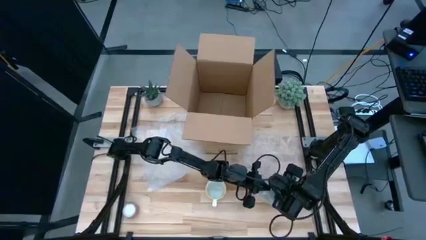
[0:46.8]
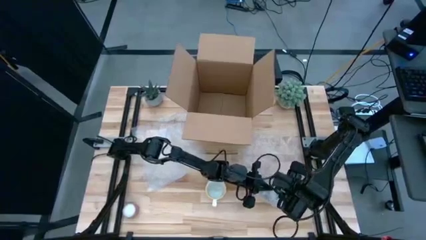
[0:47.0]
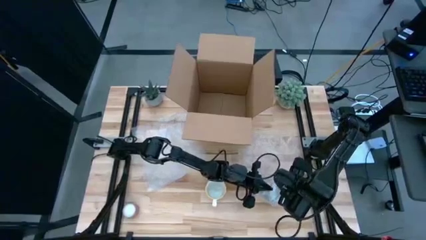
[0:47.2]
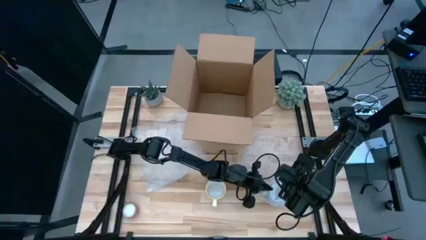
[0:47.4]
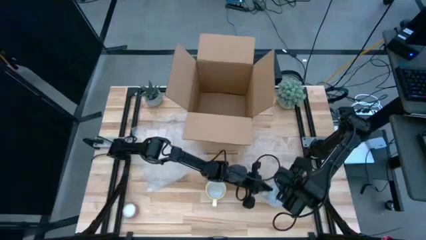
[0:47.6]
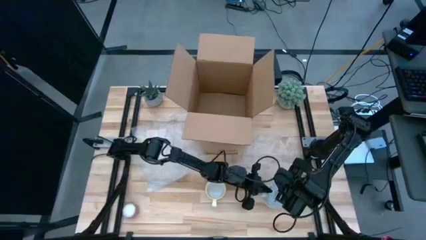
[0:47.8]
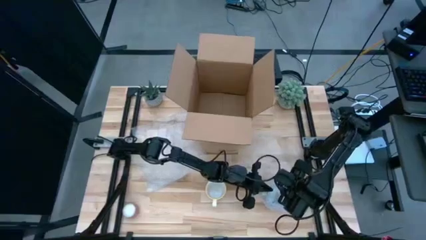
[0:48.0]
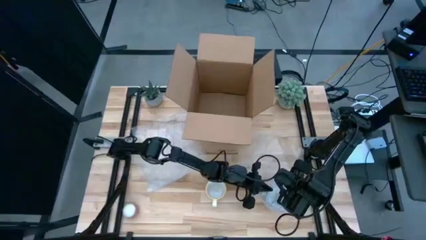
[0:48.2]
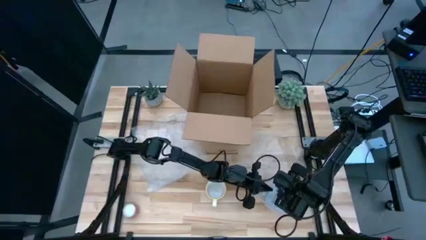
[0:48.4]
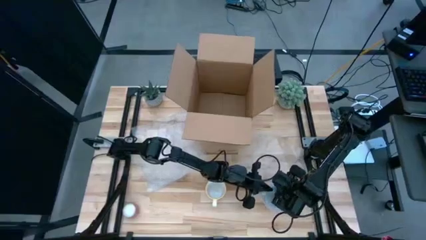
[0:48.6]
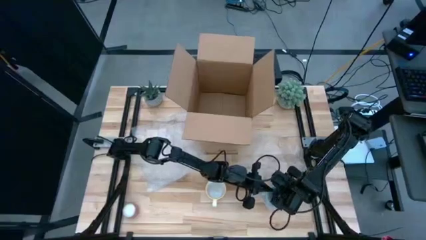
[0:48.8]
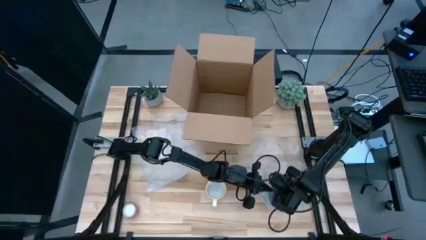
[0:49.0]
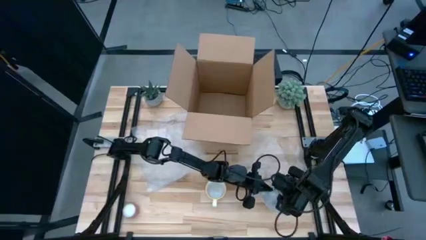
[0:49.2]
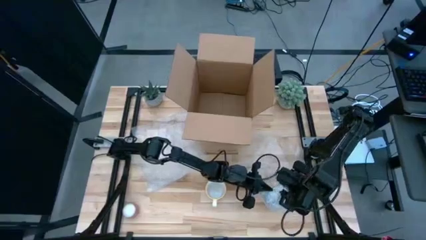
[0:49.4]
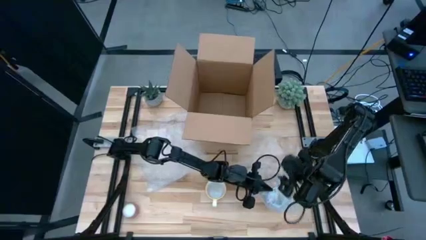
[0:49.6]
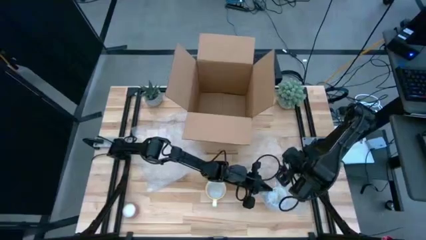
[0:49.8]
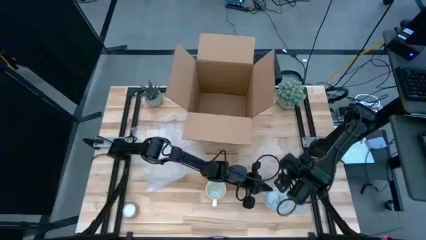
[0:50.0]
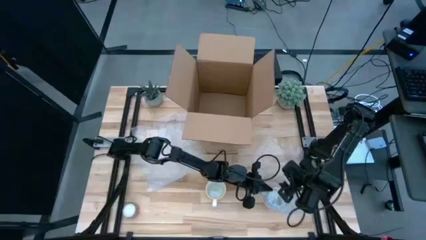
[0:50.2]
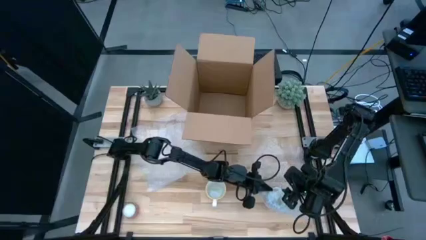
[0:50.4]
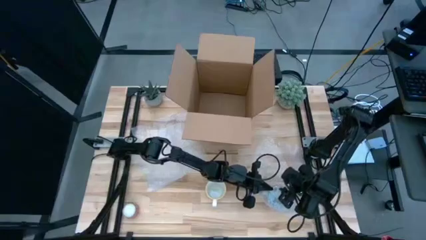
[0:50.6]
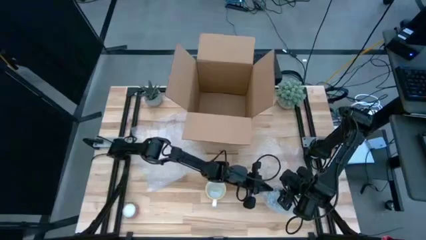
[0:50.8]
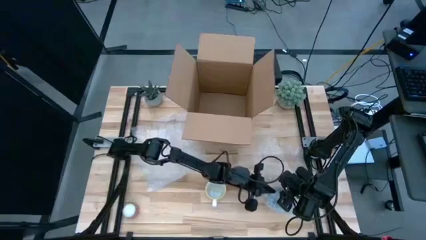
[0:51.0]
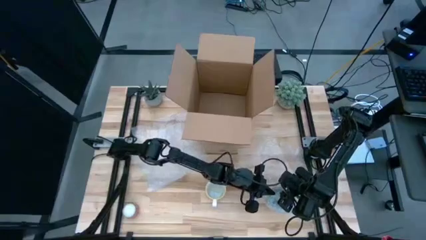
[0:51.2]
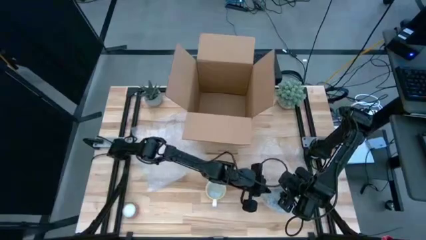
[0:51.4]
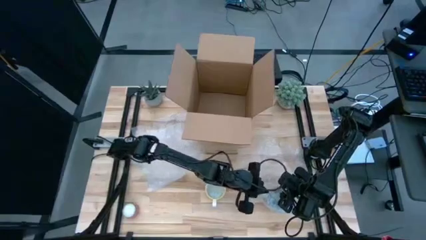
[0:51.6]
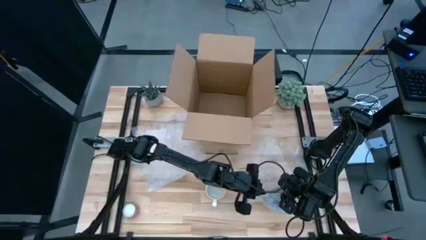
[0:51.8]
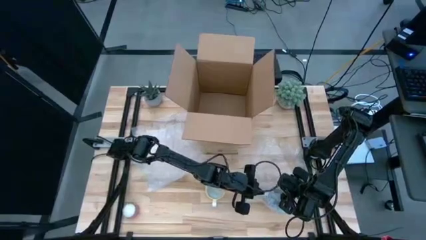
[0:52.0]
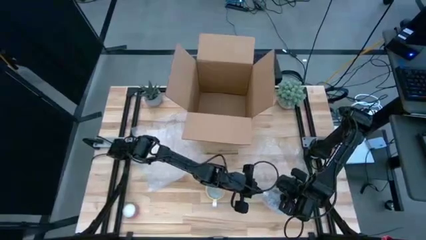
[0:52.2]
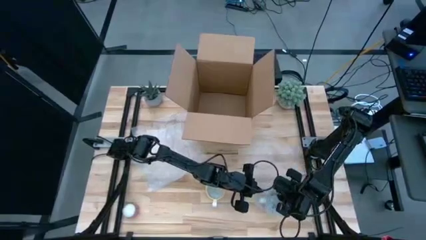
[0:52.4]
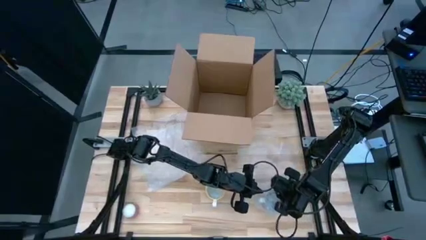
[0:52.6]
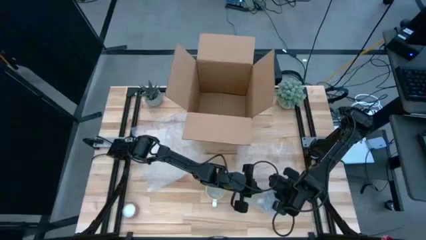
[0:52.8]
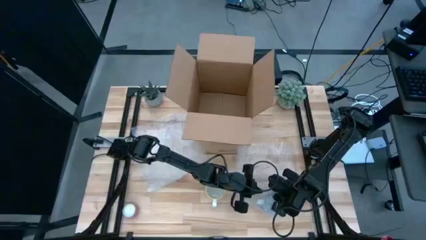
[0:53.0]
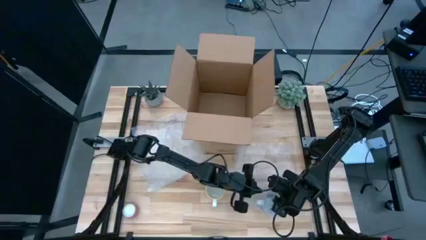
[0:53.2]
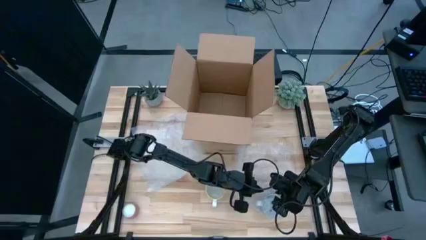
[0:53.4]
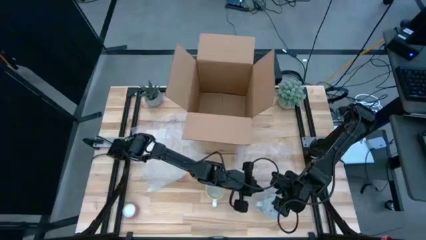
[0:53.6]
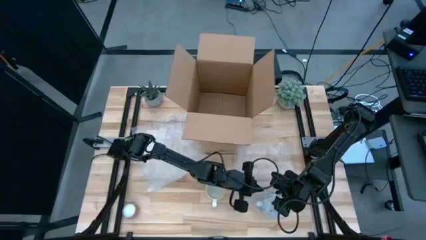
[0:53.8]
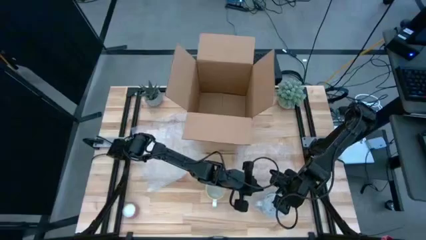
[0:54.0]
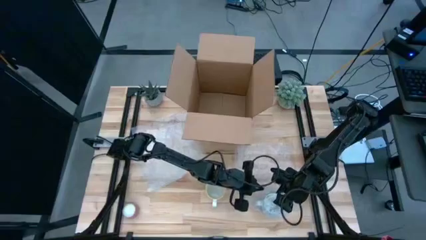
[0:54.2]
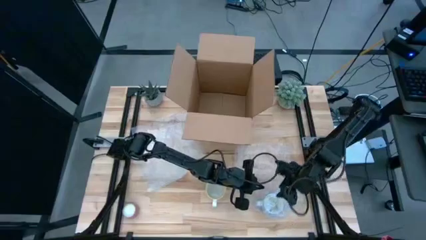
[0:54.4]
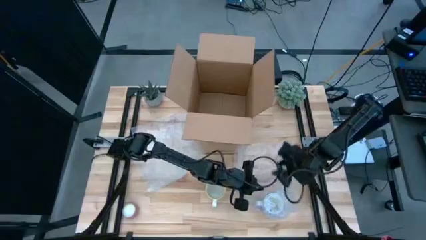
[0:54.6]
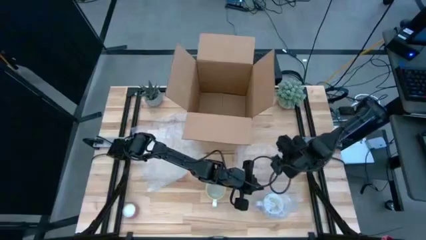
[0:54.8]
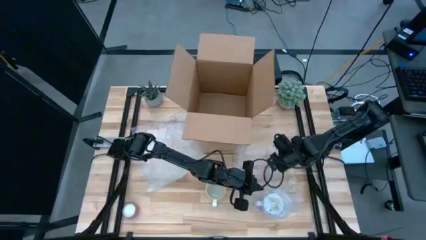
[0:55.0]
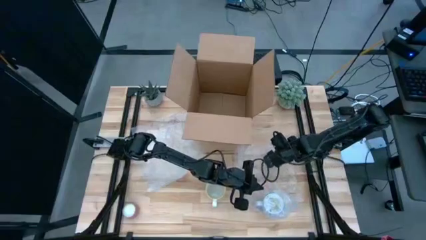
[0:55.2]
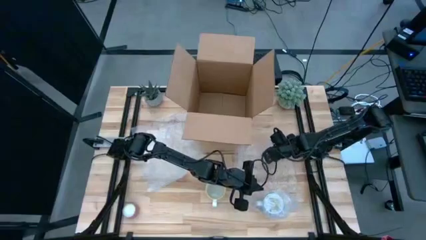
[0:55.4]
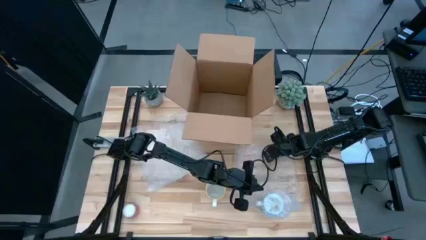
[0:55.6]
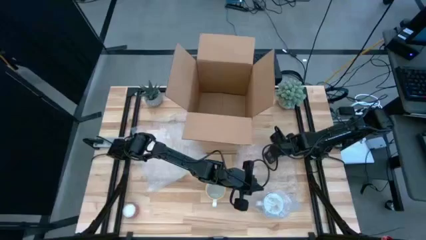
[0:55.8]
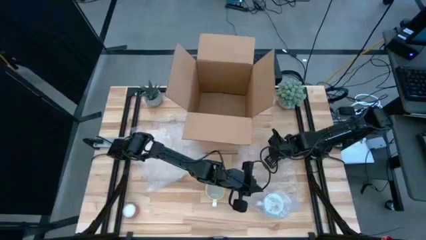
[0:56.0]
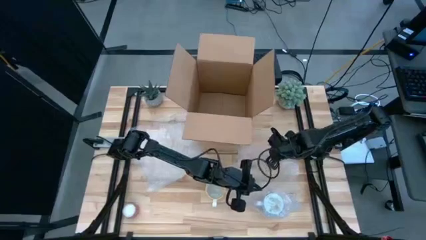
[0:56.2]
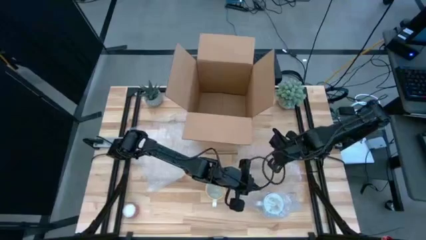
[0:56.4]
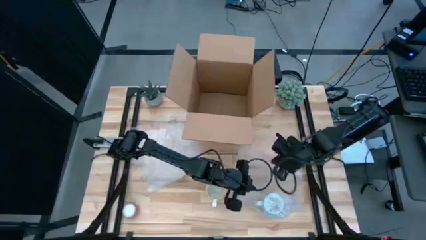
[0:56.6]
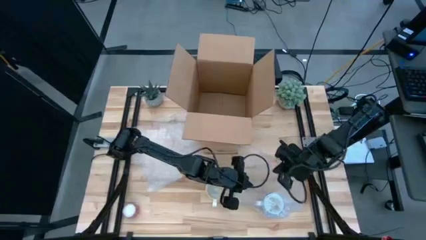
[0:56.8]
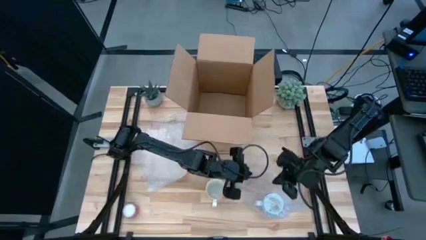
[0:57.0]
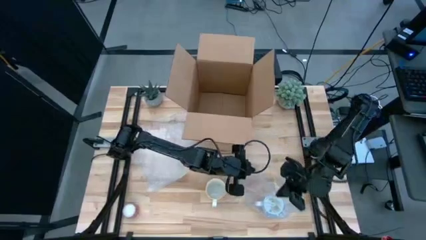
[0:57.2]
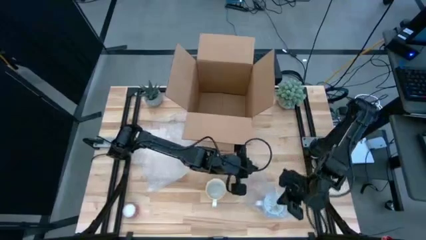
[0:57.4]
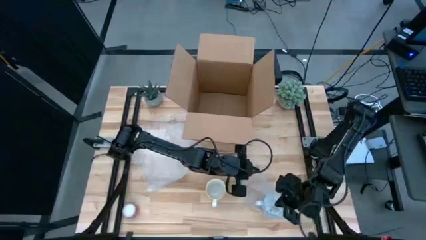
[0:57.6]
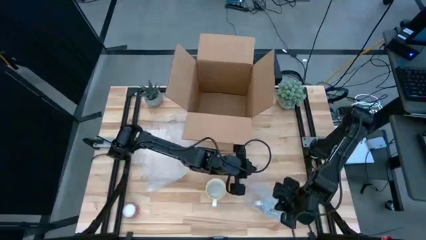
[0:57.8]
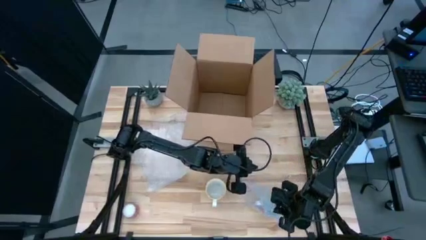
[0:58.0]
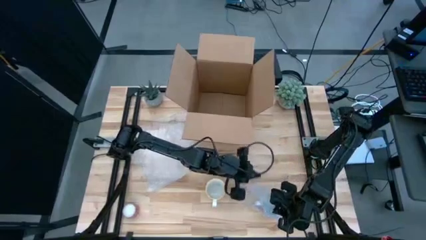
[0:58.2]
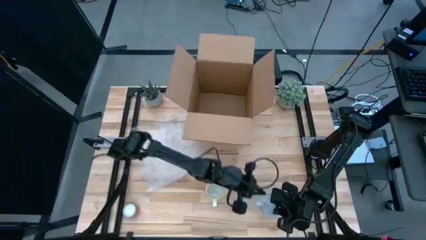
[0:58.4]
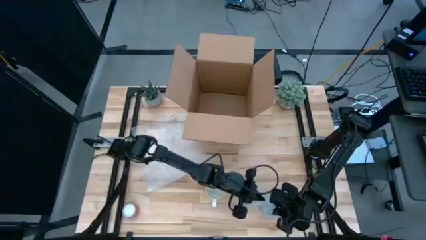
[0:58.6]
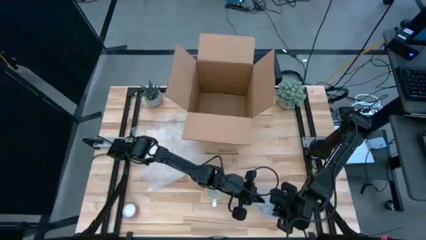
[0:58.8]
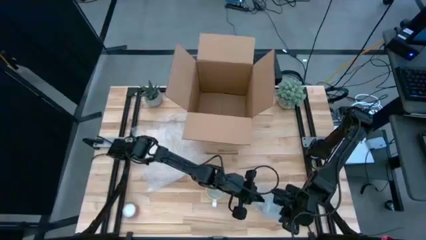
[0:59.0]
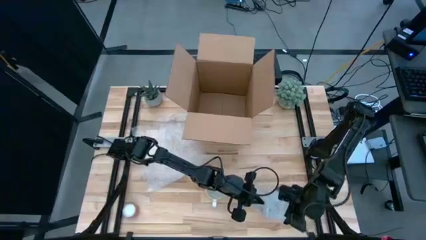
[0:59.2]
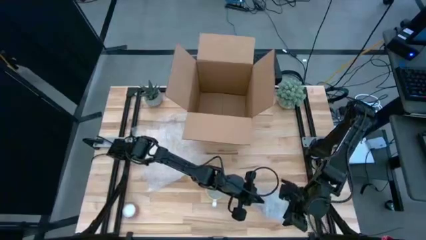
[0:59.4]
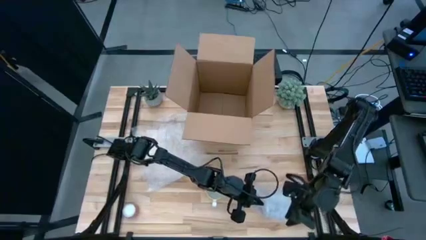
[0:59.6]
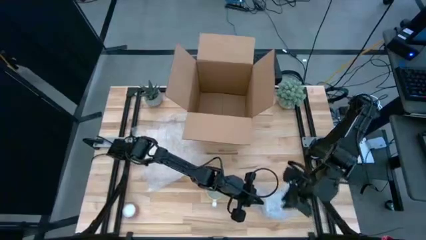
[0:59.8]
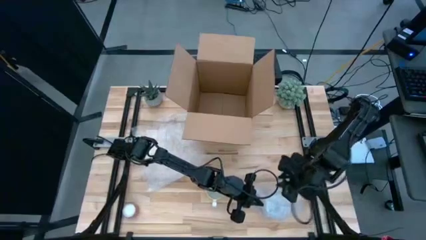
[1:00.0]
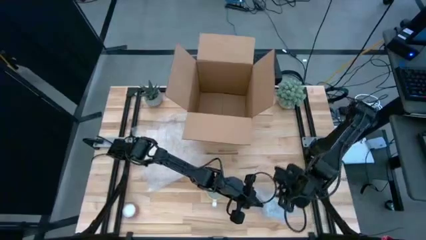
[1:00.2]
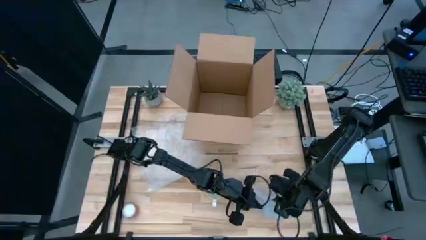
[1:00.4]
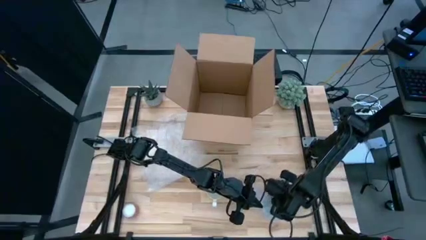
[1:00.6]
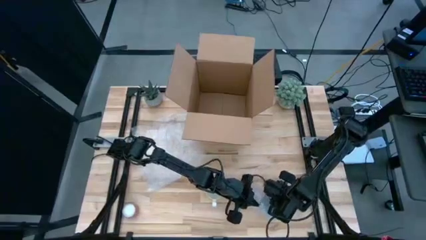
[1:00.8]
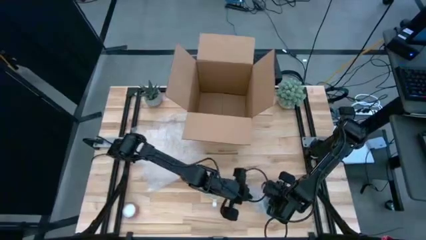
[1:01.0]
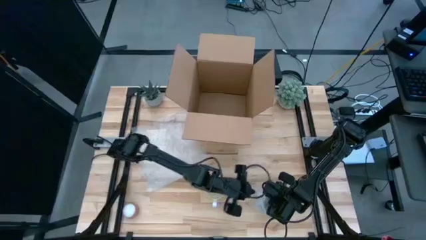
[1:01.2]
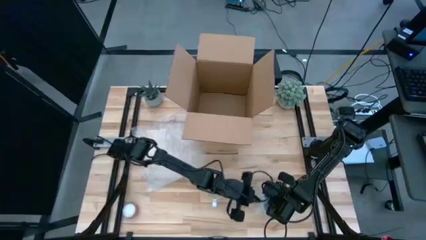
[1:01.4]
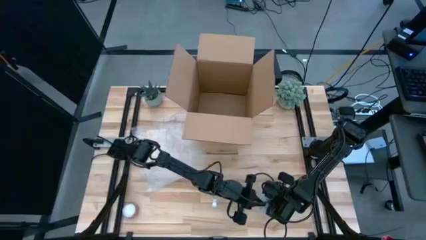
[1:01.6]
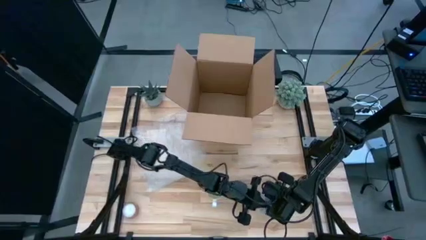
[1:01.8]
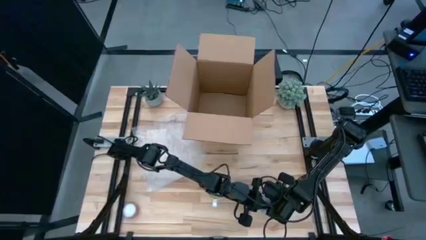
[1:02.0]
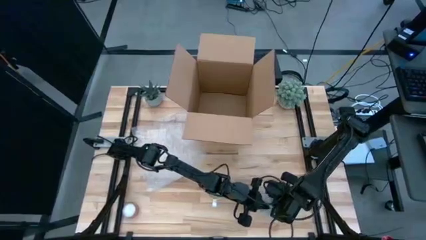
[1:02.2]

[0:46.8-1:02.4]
Task: wrap mug
Wrap the red cup with the bubble wrap

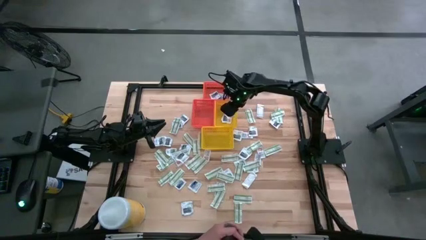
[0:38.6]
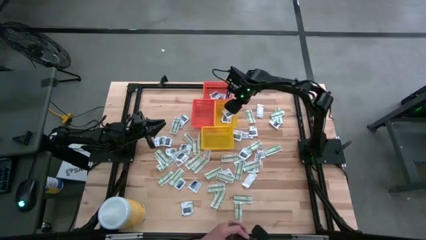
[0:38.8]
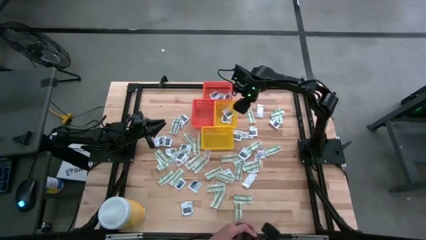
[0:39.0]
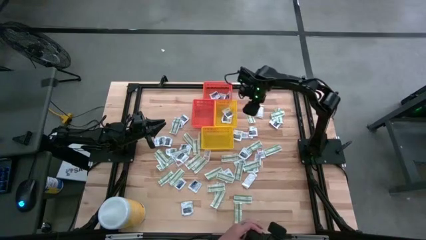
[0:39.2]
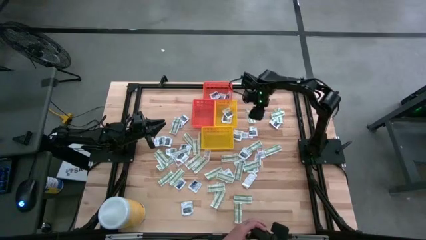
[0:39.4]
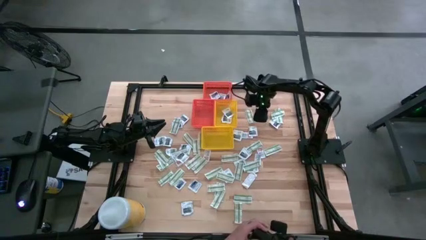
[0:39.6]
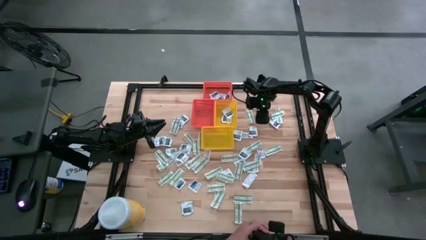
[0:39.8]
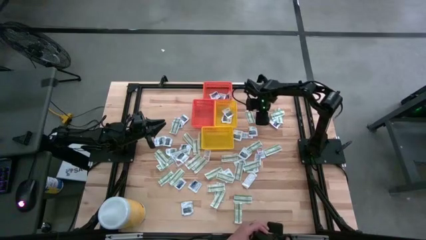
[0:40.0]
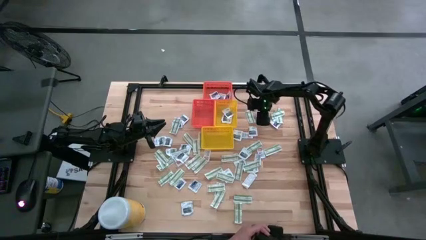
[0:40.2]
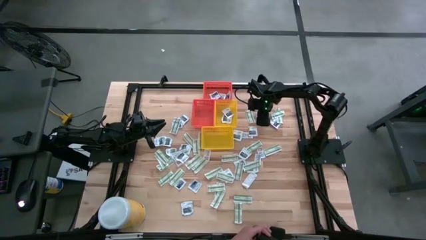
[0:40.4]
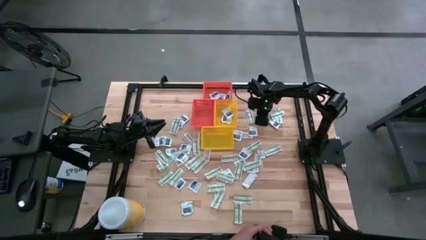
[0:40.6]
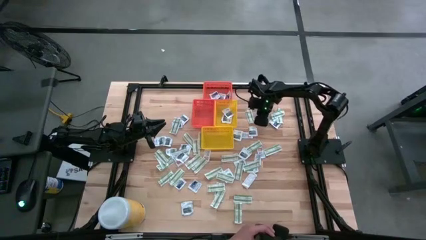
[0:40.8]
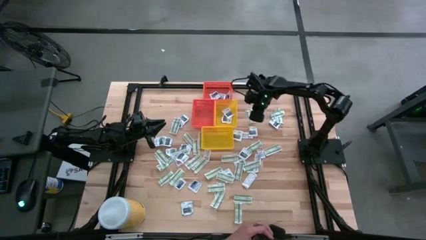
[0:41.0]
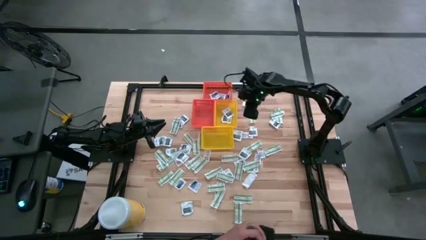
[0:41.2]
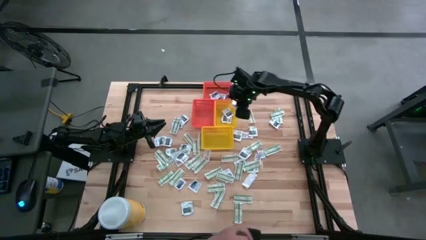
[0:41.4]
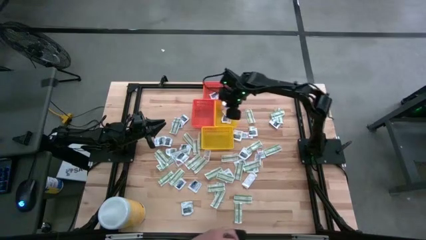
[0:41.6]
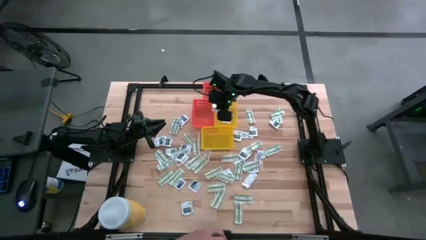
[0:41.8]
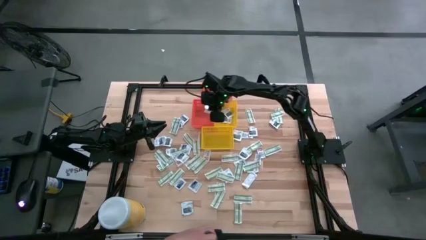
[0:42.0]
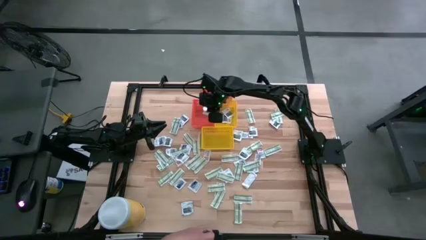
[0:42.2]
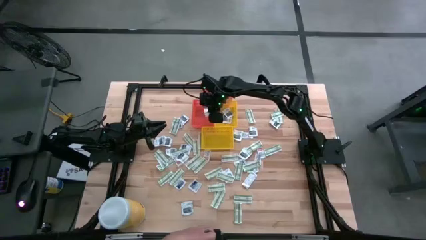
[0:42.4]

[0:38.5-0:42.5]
Task: Pick & Place First Aid Supplies
Put the bandage into the bottom orange bin
